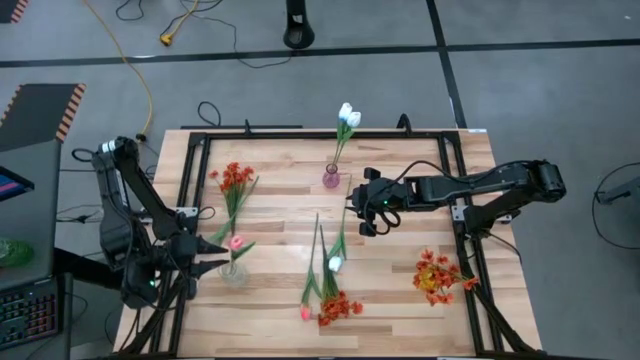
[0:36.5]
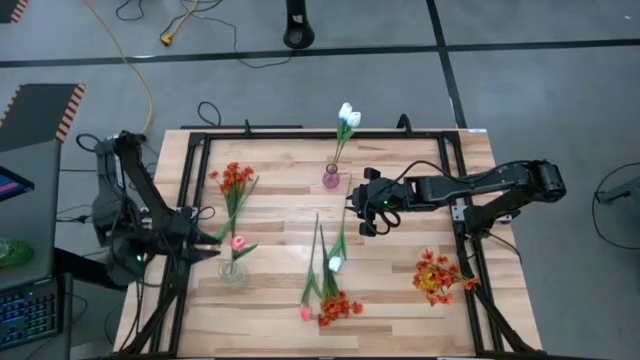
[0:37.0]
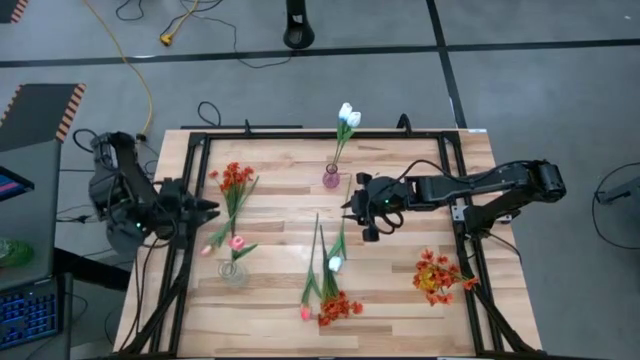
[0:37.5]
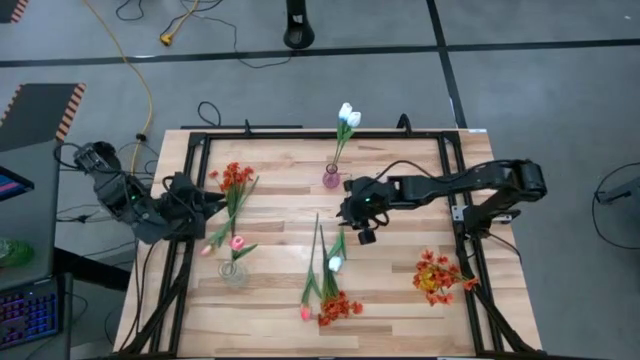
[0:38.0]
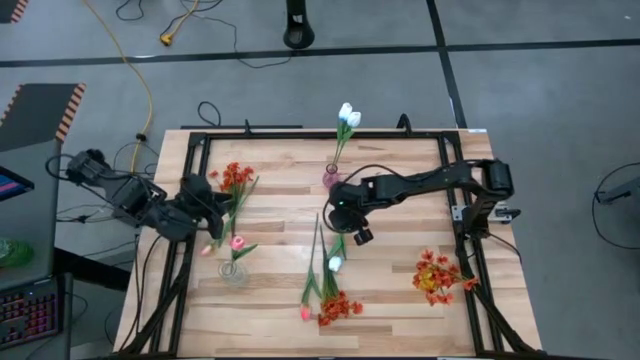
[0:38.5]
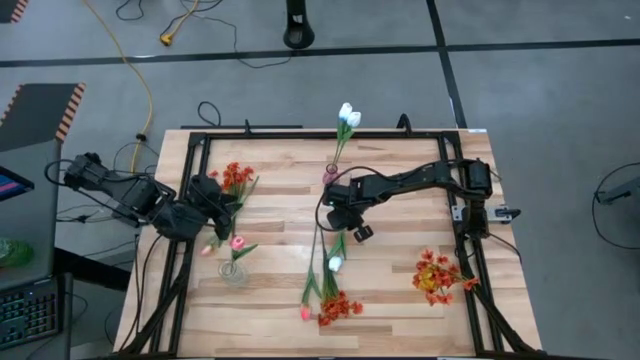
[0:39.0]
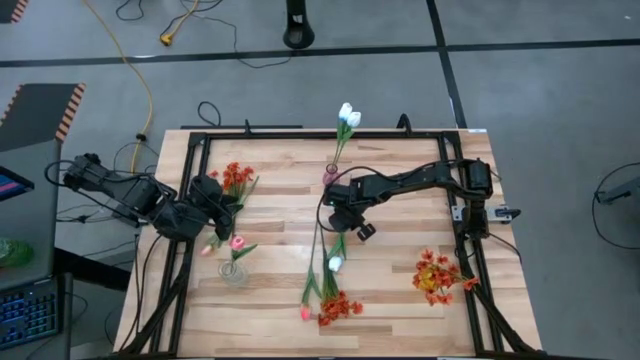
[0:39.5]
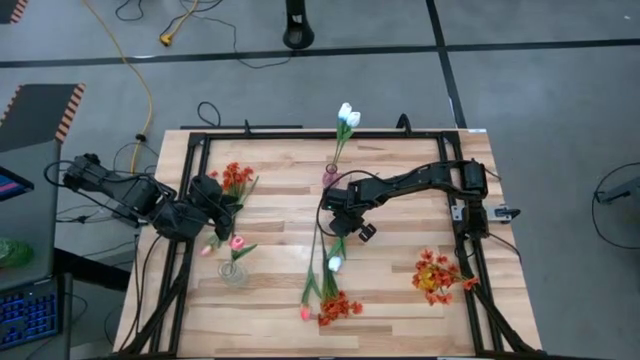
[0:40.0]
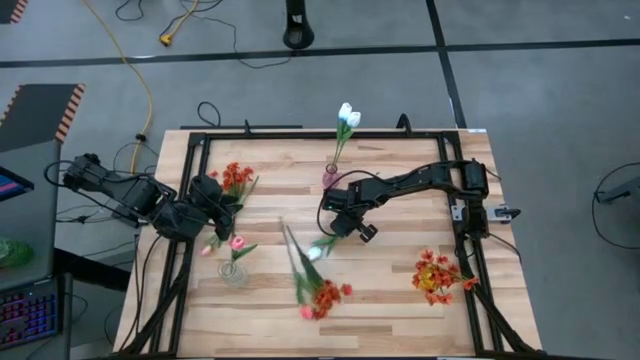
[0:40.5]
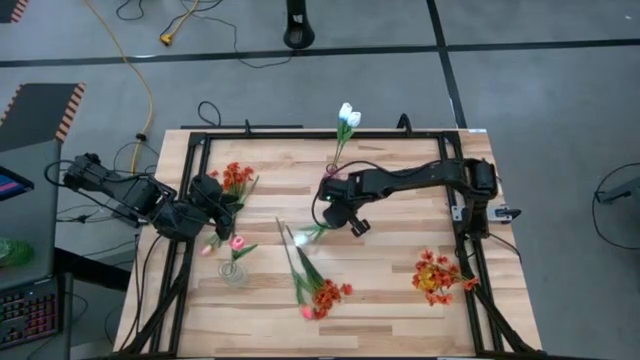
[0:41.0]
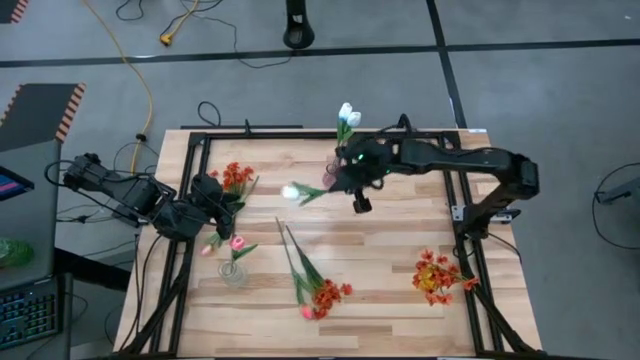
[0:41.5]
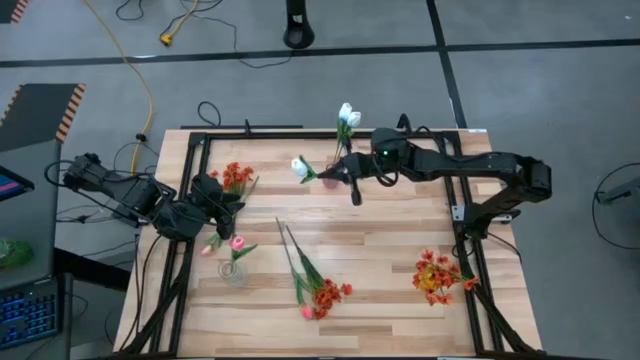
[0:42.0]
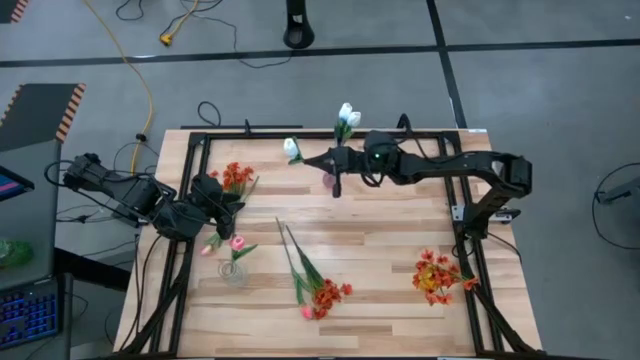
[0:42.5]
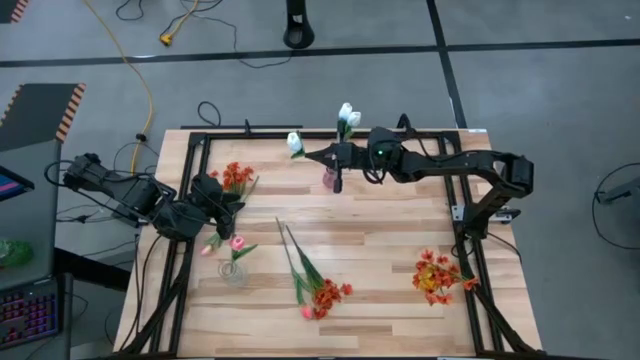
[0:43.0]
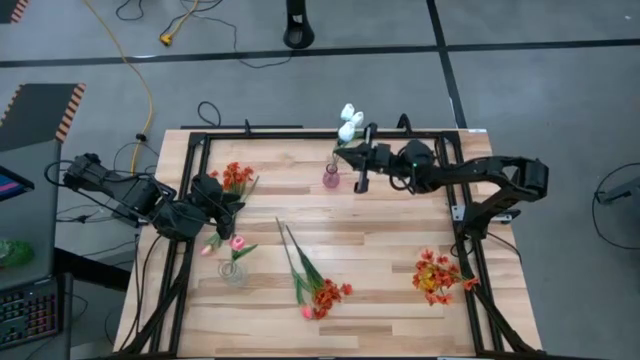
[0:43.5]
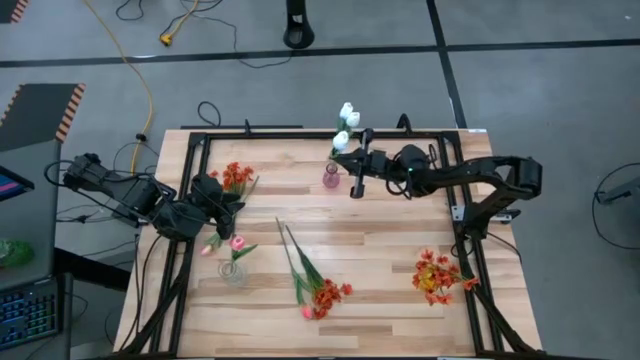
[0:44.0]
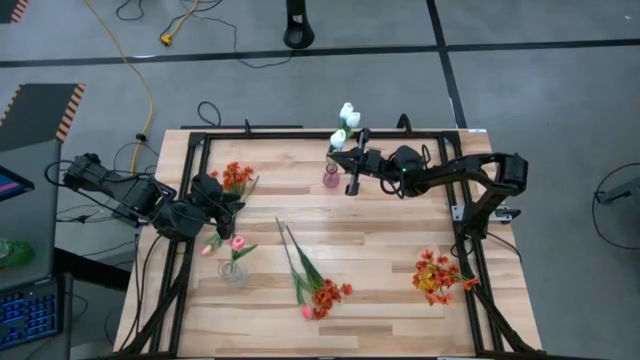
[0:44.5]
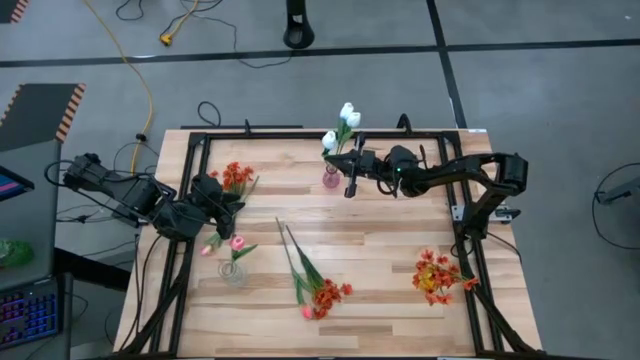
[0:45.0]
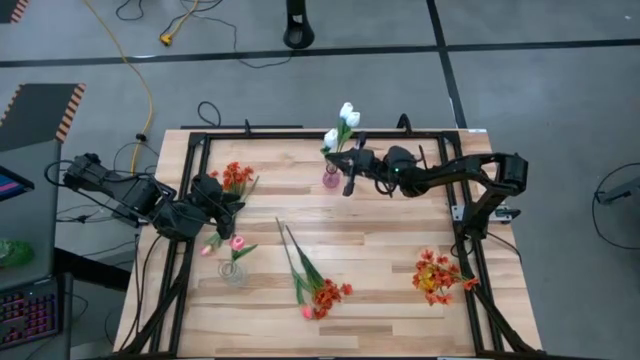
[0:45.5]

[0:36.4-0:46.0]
Task: Sort flowers into vase by color
Put the white flower into the pink vase

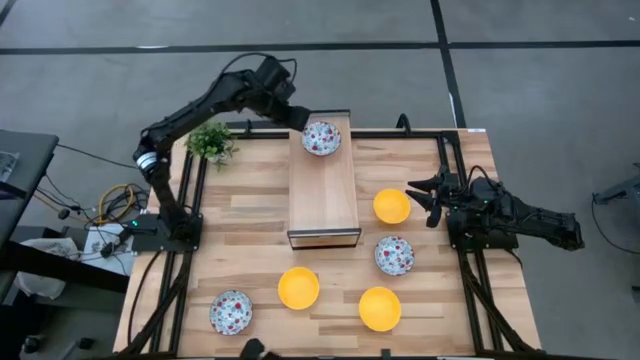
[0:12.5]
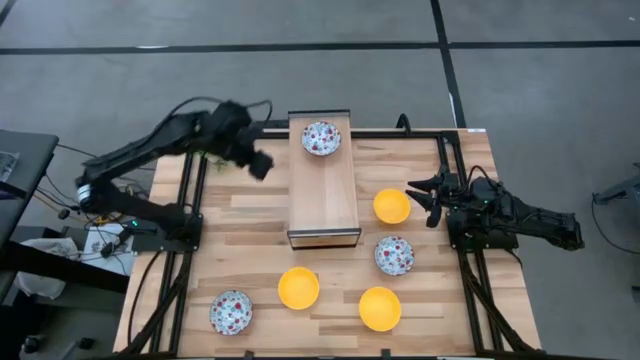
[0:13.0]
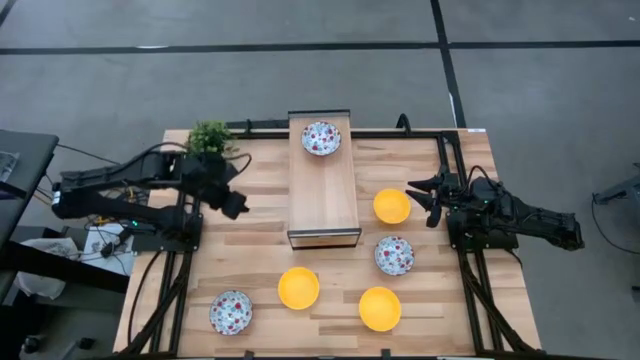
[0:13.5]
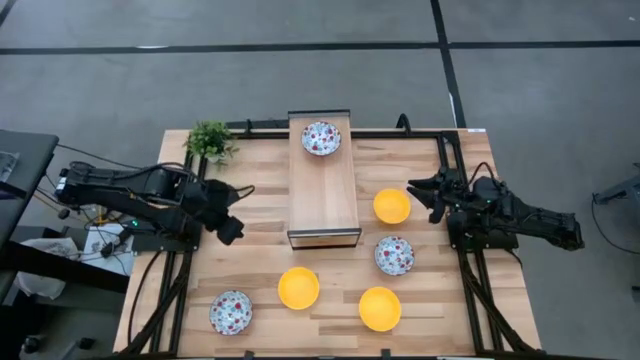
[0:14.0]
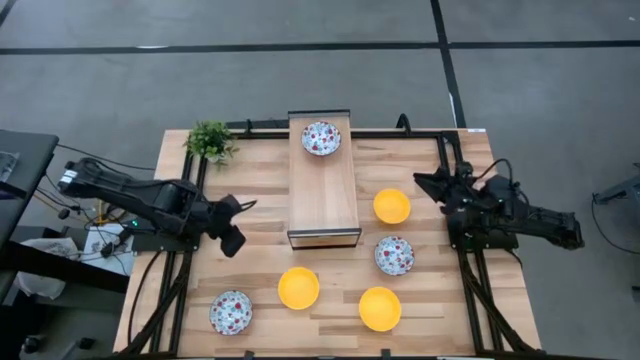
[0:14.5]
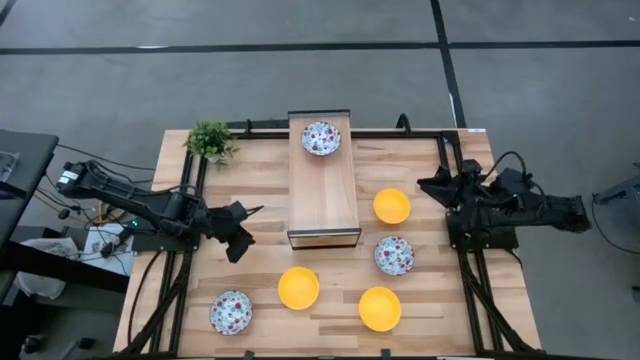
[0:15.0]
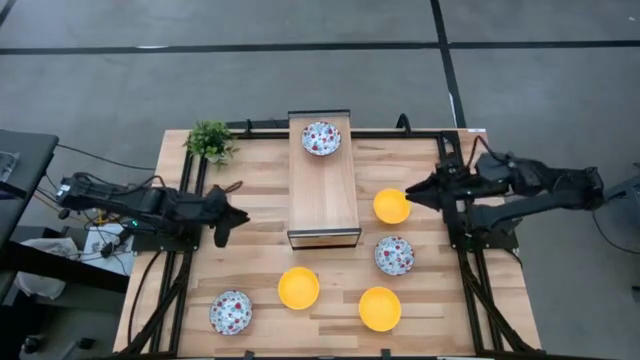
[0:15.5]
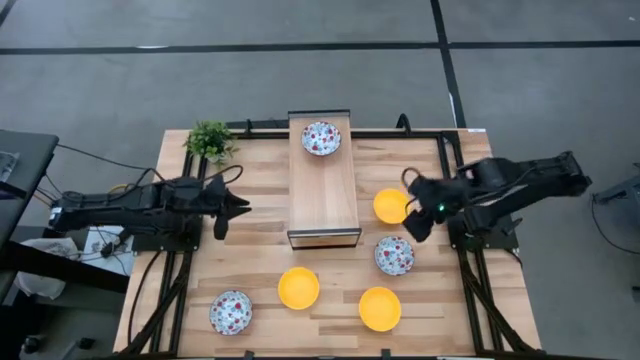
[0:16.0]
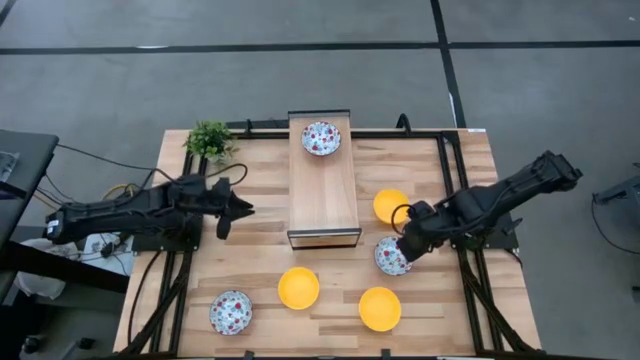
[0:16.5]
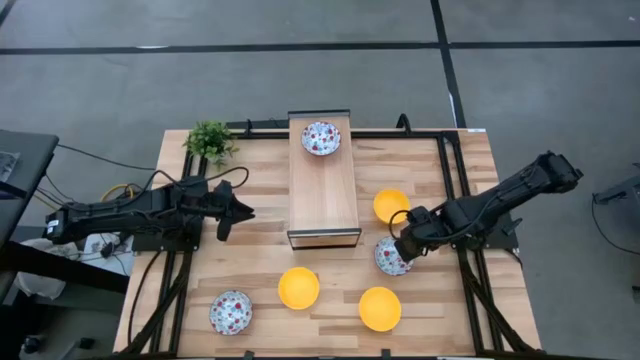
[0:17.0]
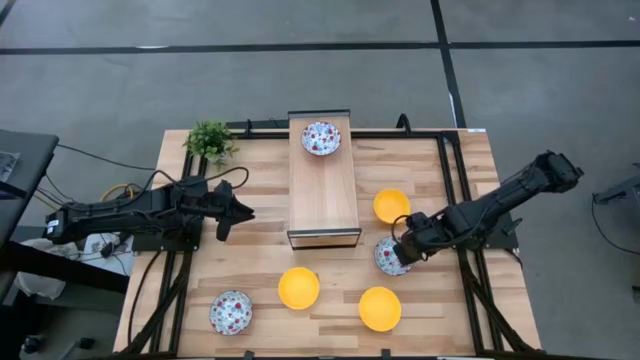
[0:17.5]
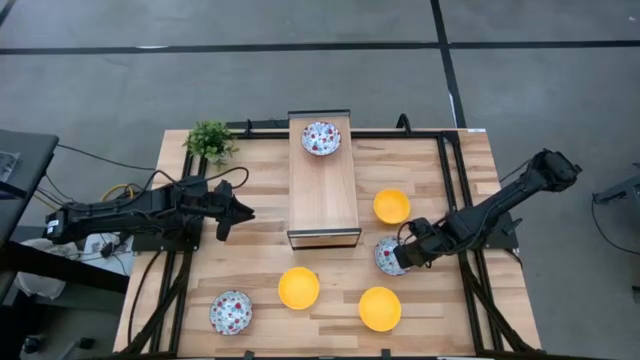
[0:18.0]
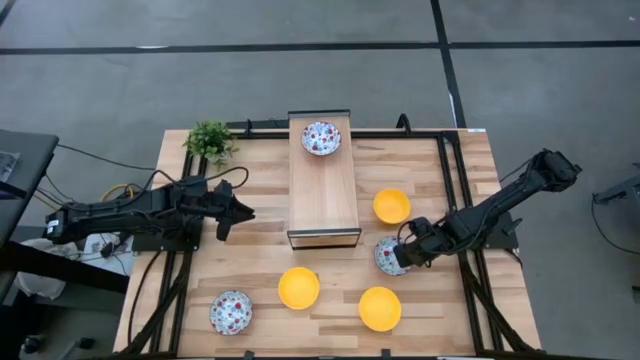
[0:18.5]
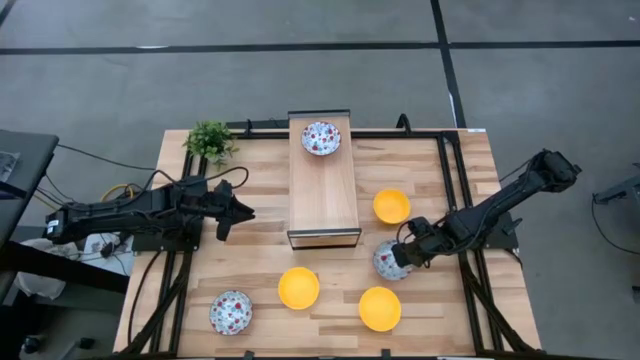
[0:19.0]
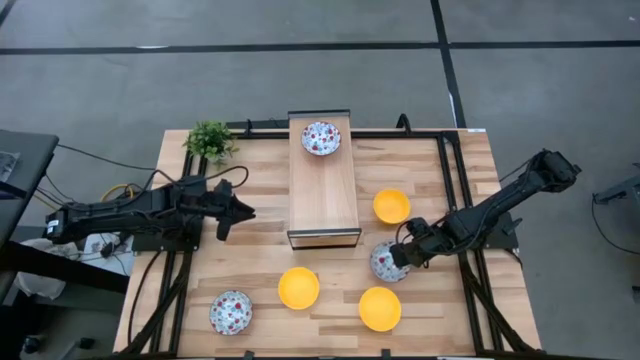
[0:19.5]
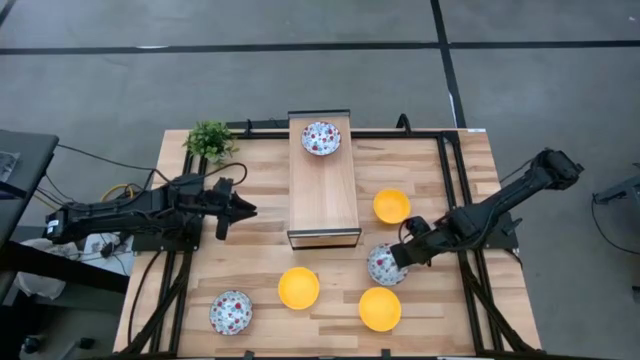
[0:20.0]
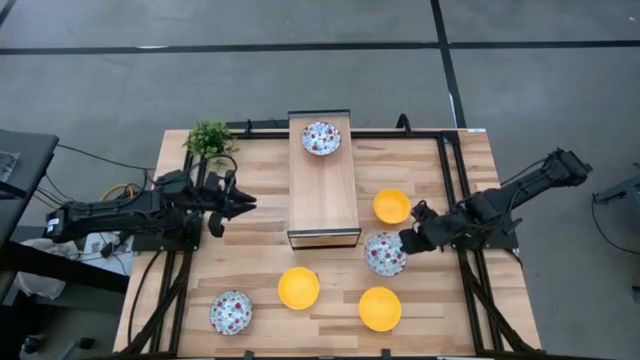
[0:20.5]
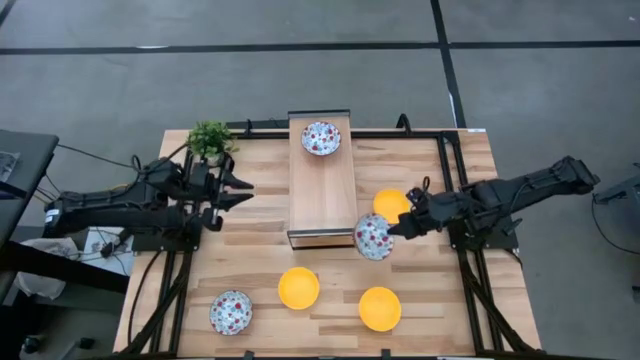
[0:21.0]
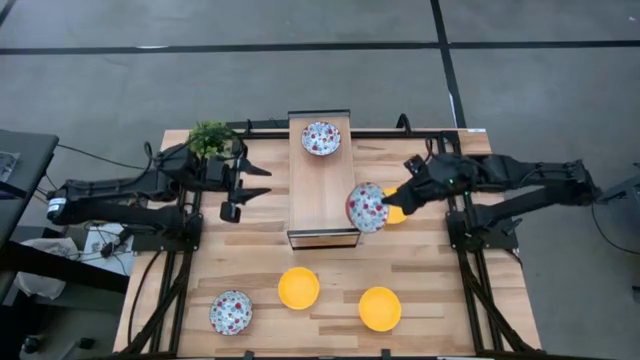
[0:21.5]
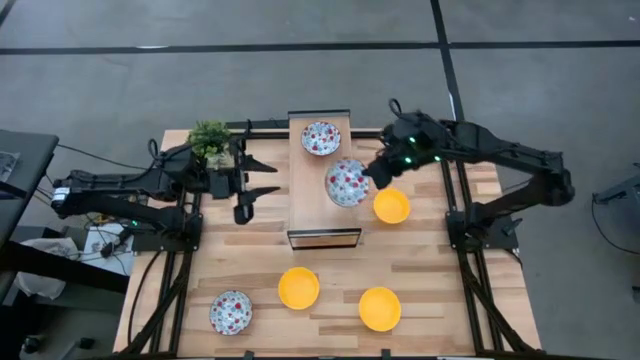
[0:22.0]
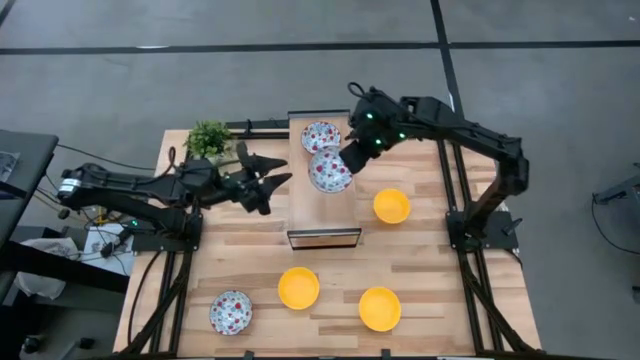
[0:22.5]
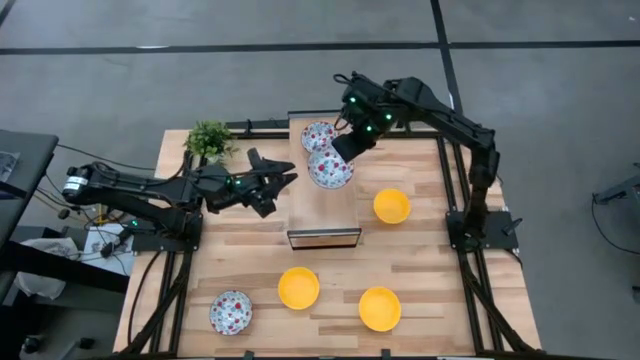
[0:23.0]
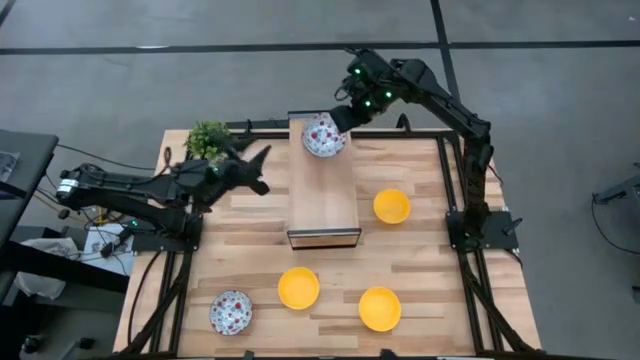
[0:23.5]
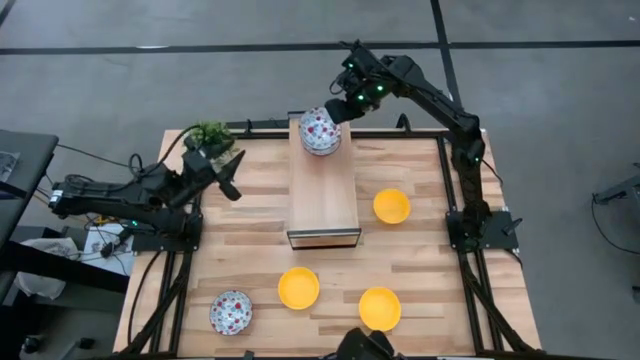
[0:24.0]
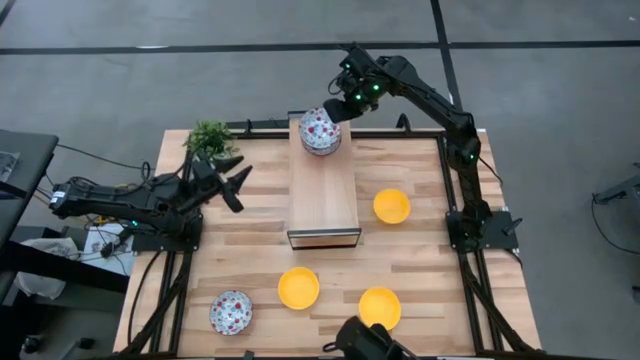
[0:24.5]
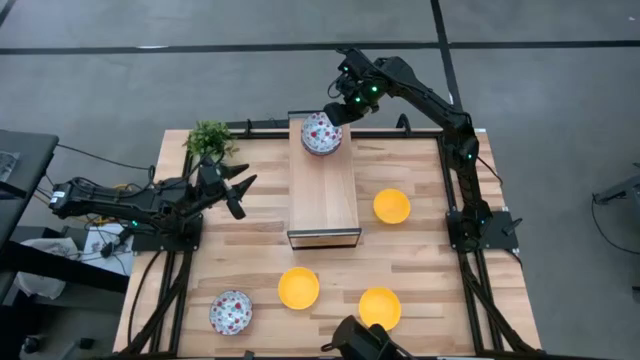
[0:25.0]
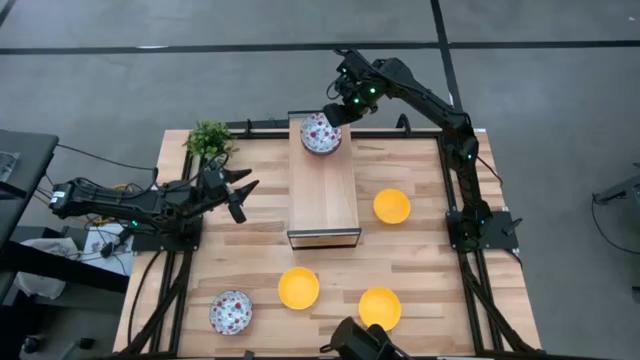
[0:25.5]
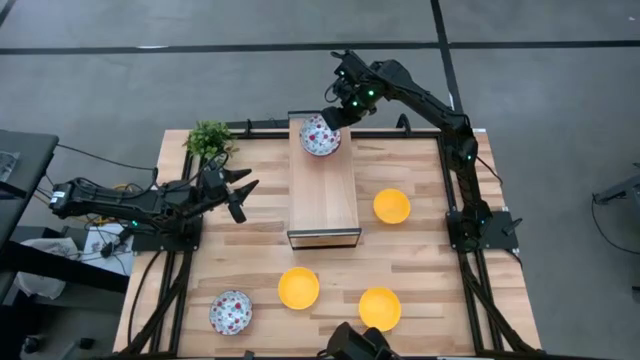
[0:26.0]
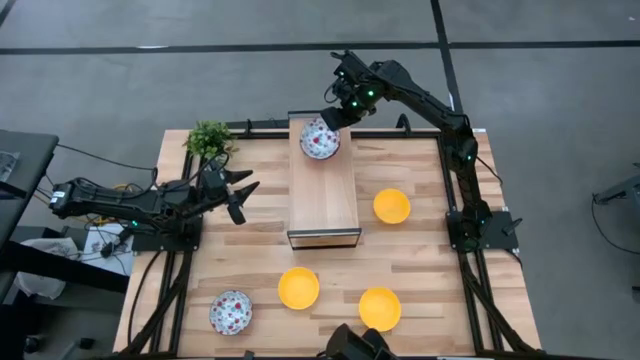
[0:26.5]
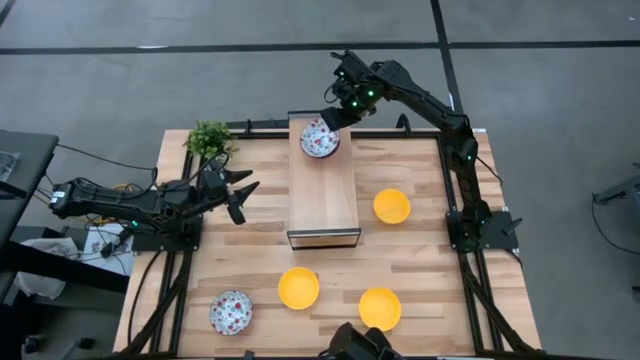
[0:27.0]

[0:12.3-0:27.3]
Task: Pick & Place Mini bowls
Stack the top white patterned bowl on the other white patterned bowl on the shelf
